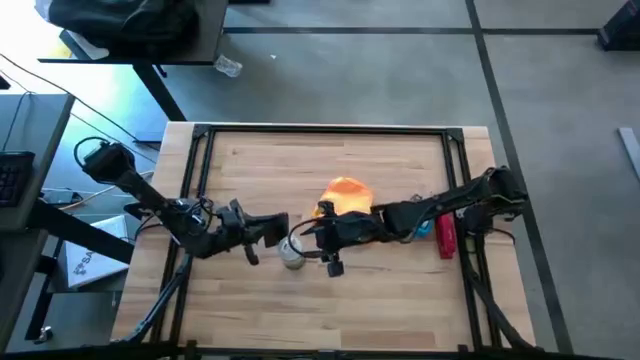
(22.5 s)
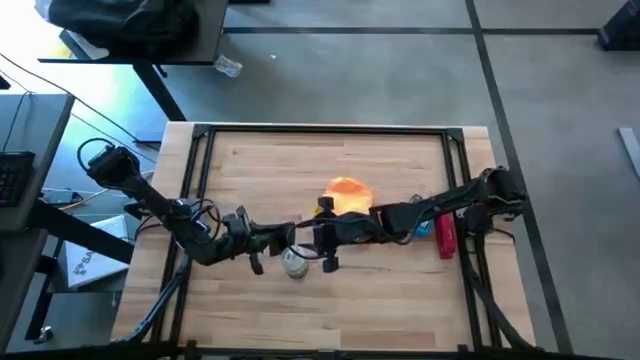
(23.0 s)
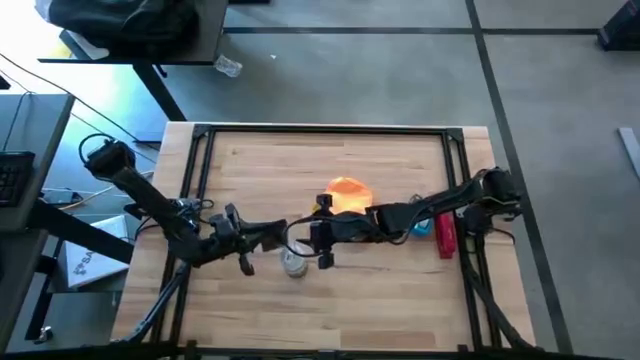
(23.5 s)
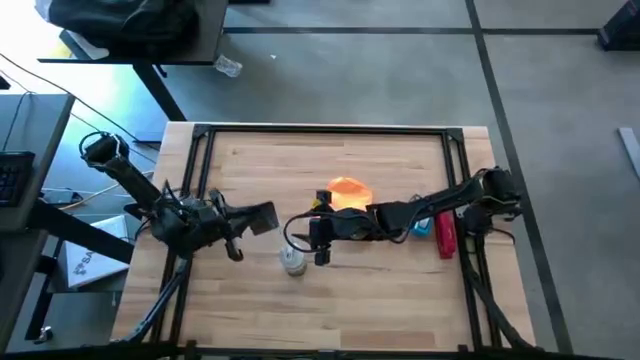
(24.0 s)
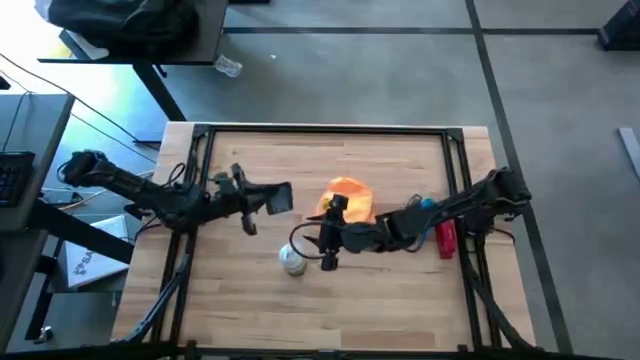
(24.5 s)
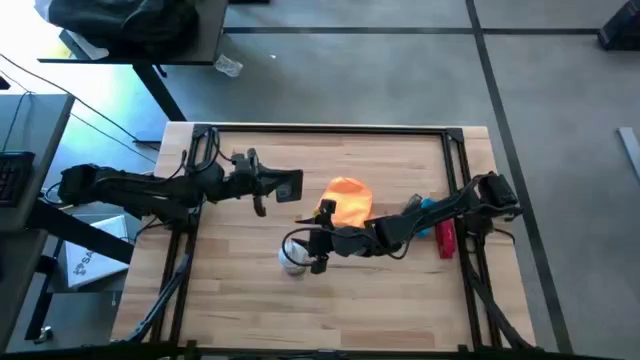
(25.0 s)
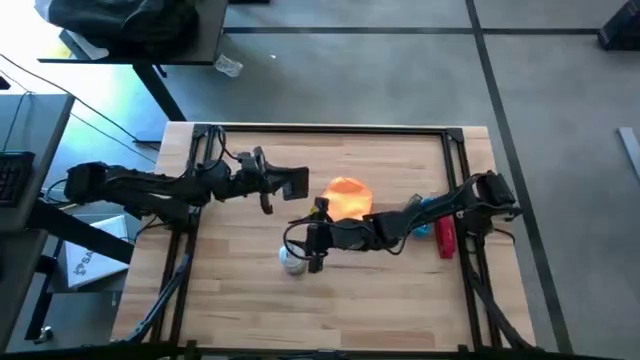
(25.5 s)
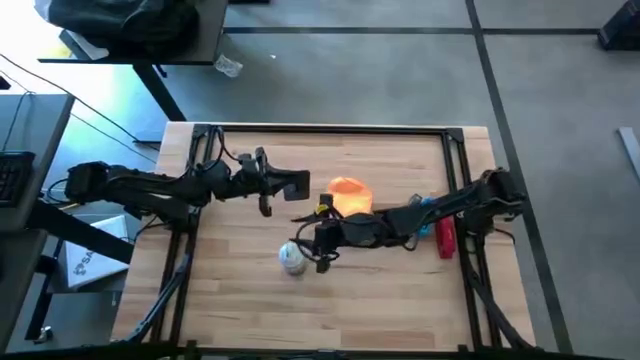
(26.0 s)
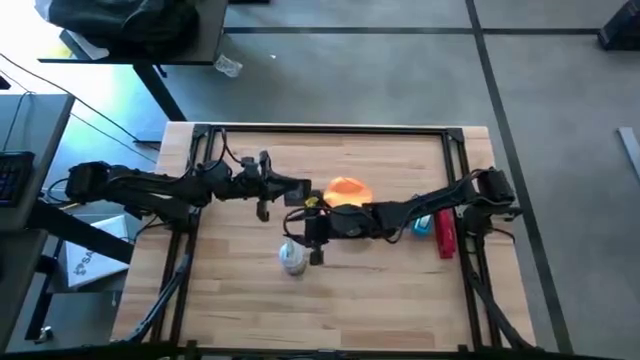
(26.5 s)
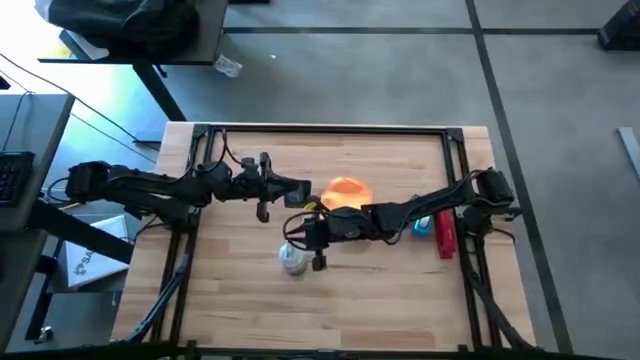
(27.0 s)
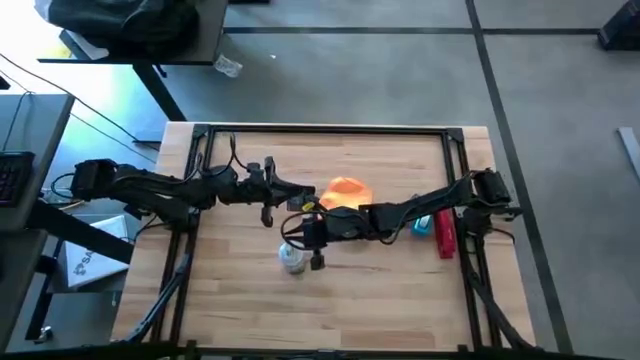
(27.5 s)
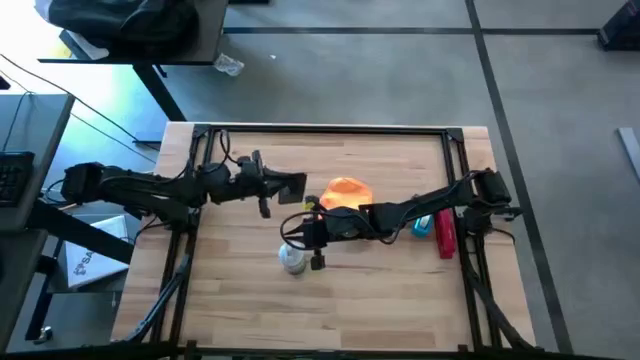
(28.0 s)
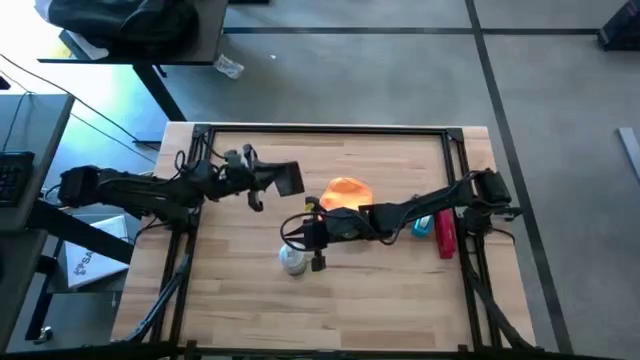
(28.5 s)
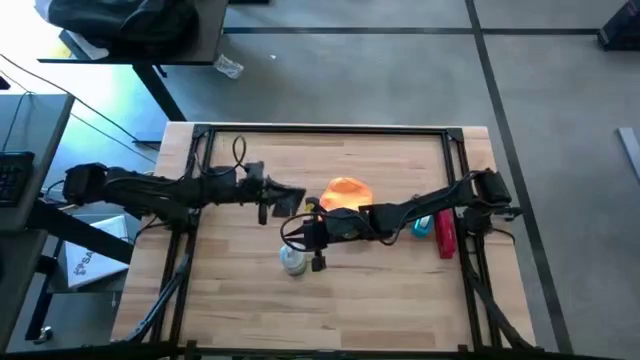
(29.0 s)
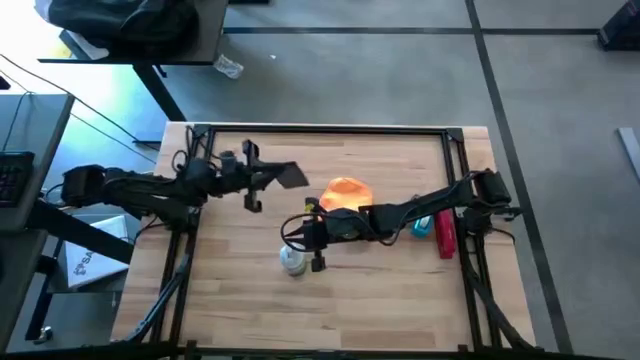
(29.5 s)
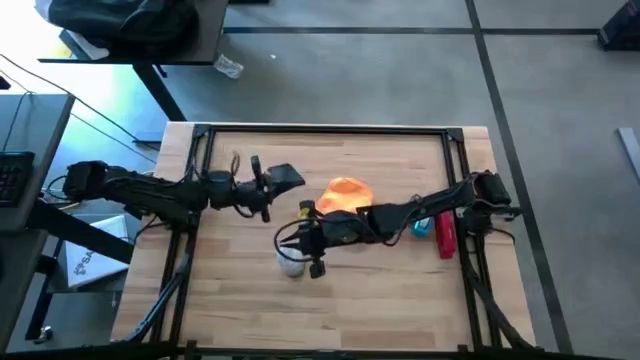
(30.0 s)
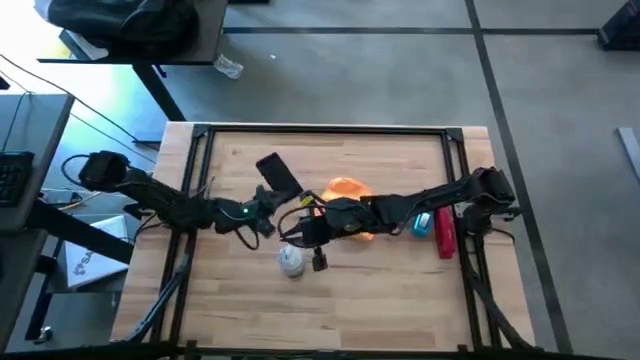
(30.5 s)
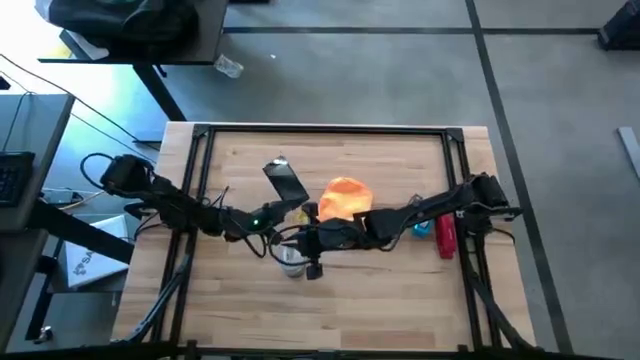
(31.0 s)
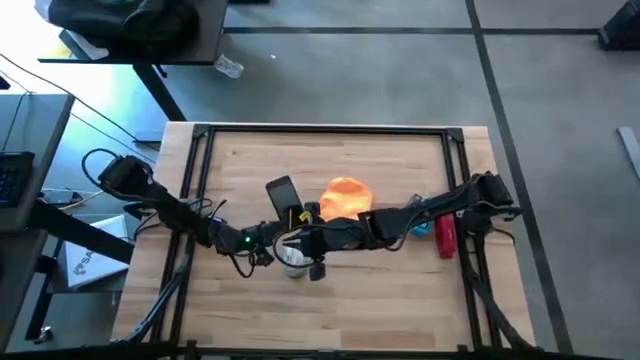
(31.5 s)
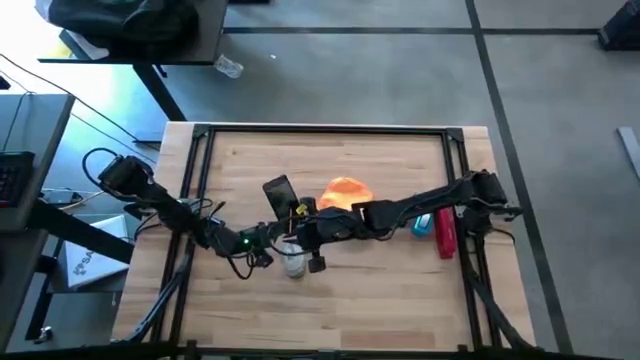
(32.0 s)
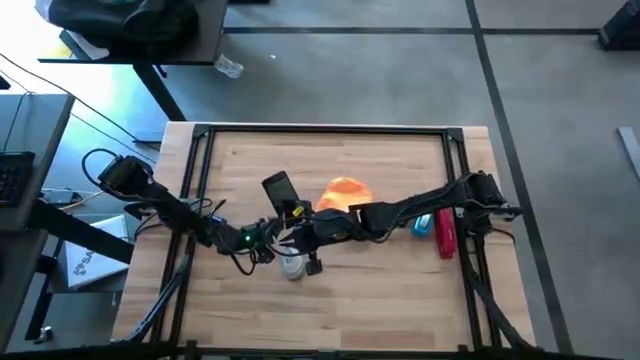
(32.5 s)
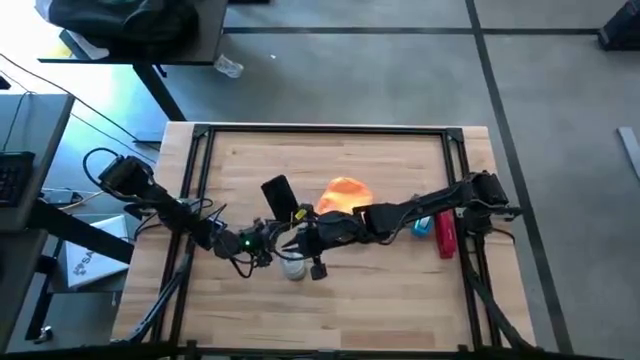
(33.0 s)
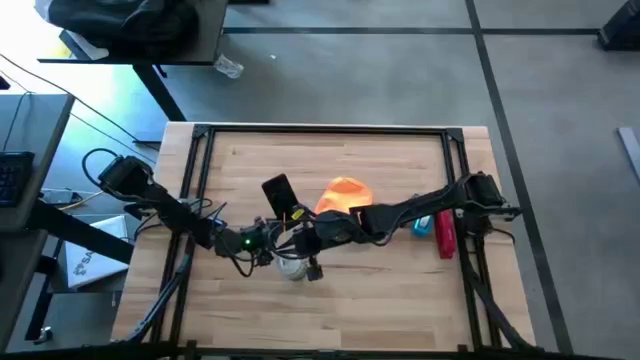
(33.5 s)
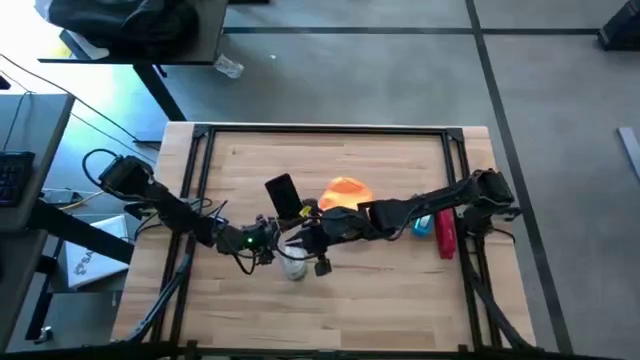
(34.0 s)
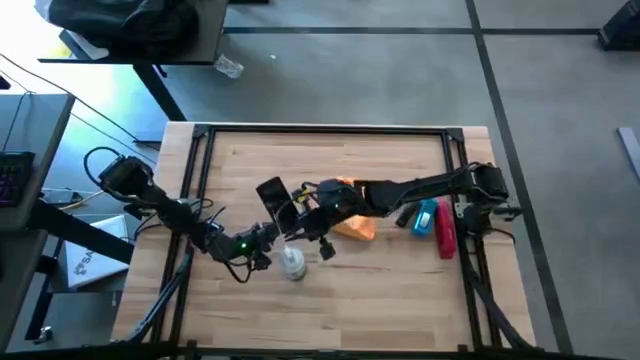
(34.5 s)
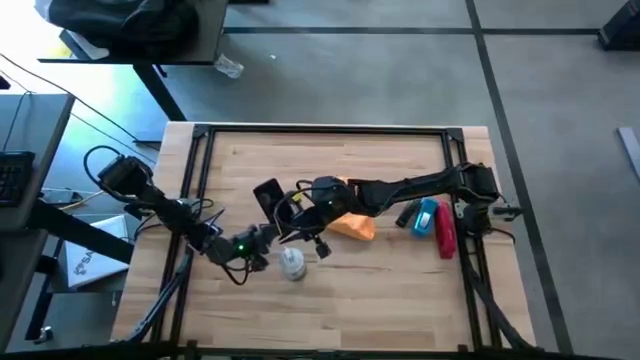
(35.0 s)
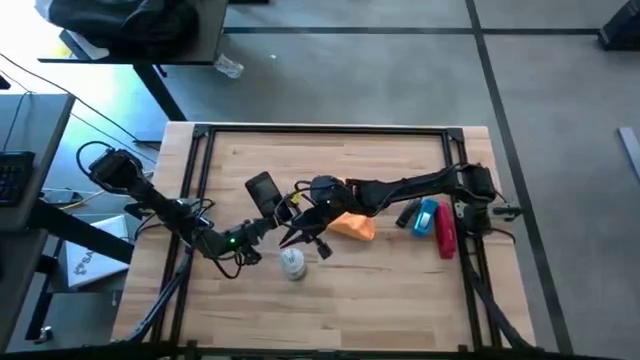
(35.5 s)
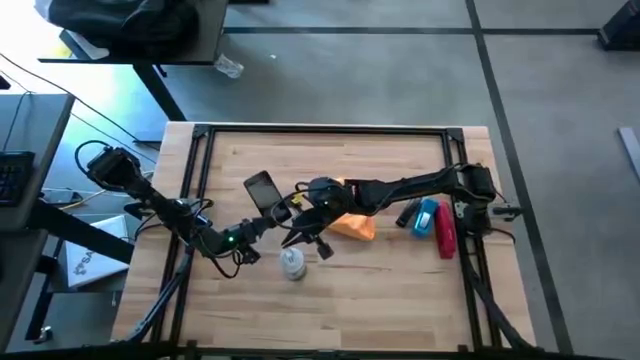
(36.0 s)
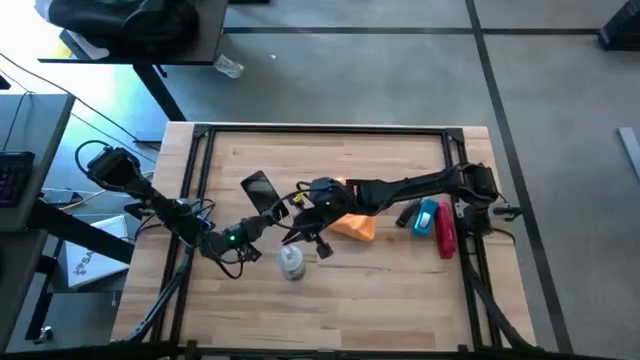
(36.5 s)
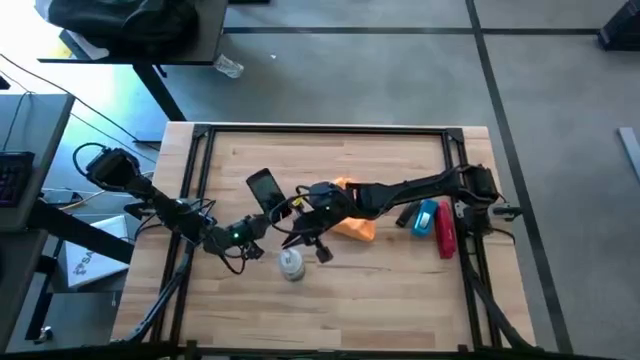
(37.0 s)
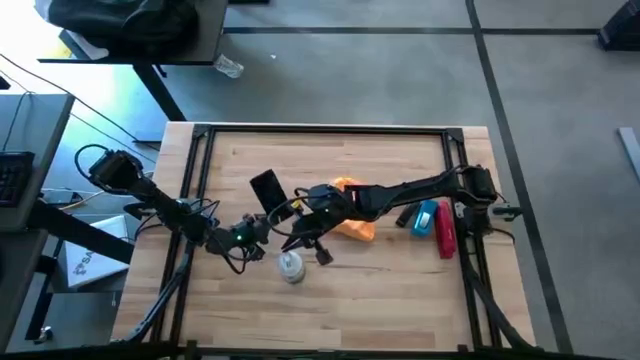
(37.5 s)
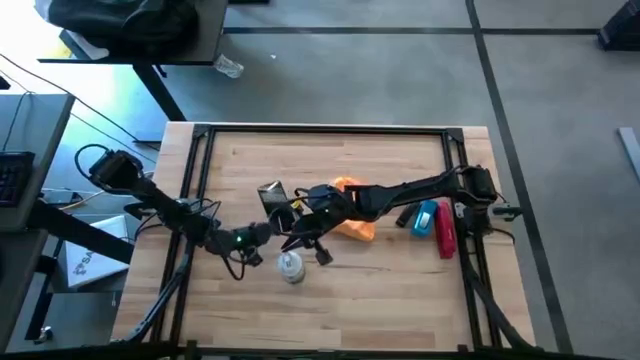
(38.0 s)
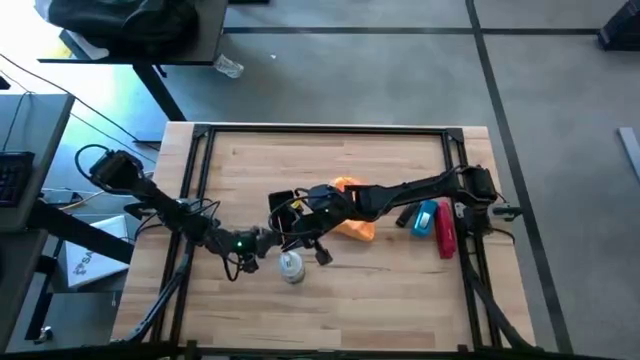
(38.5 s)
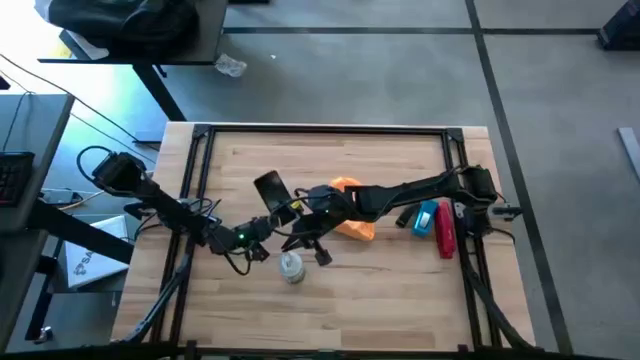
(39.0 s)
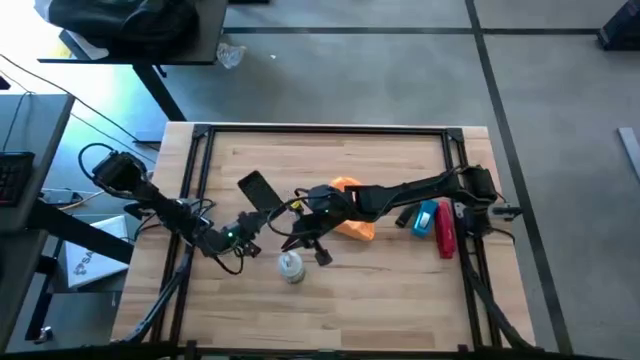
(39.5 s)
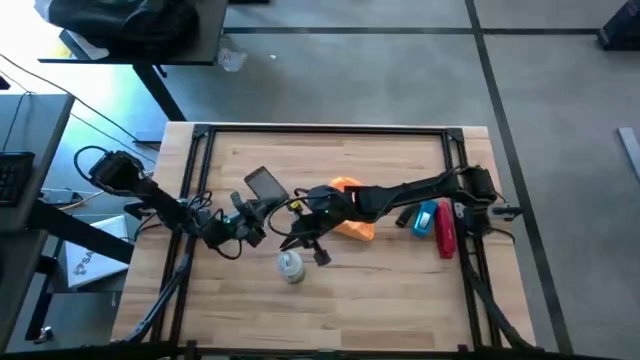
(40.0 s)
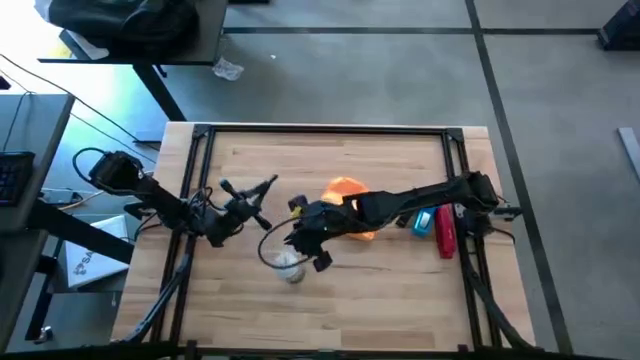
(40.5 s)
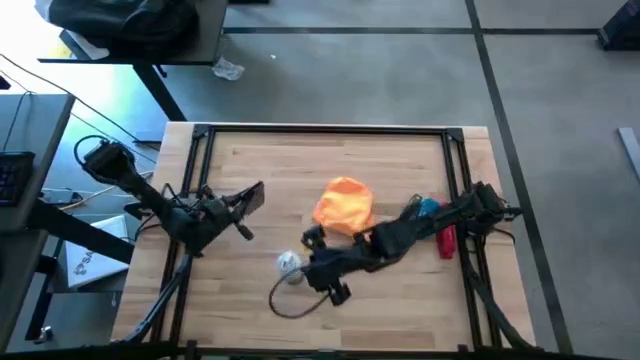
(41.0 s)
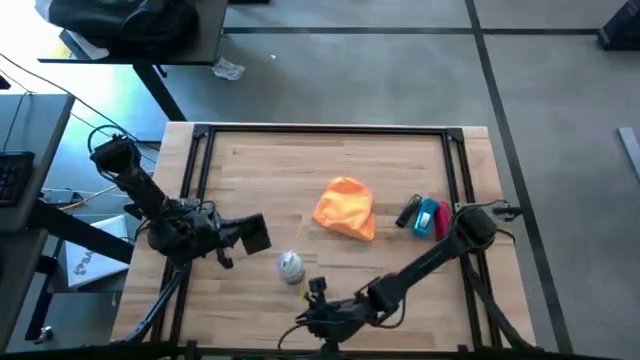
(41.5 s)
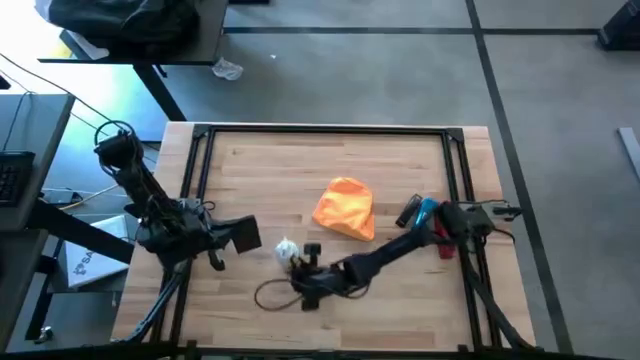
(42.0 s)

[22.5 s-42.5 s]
Task: Apply microfiber cloth
Spray the black cellphone using the spray bottle
